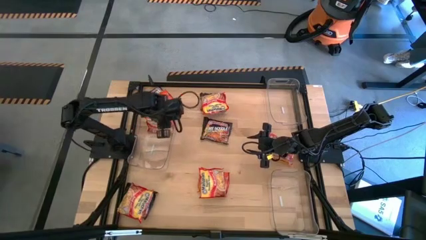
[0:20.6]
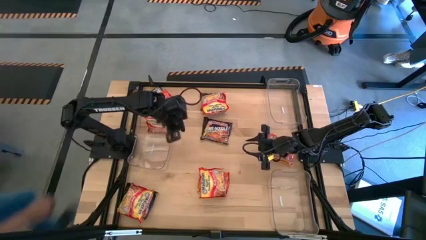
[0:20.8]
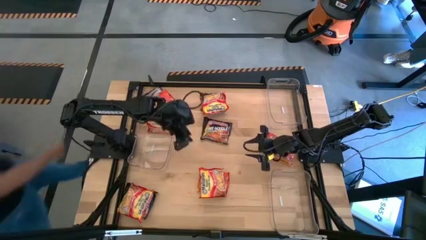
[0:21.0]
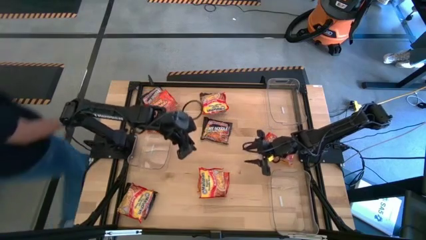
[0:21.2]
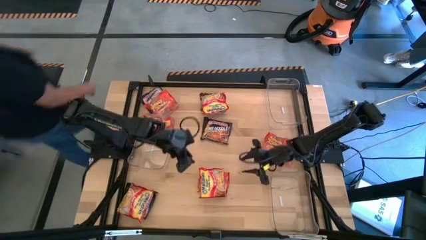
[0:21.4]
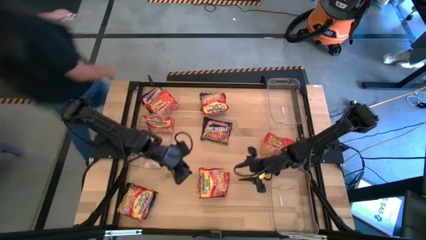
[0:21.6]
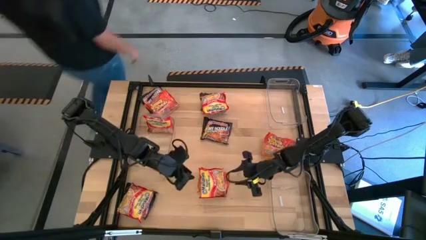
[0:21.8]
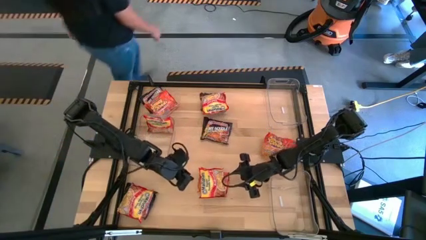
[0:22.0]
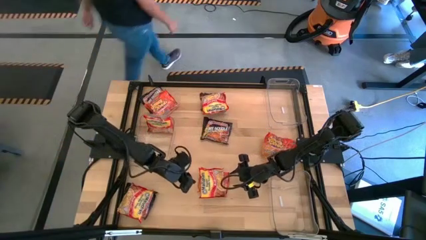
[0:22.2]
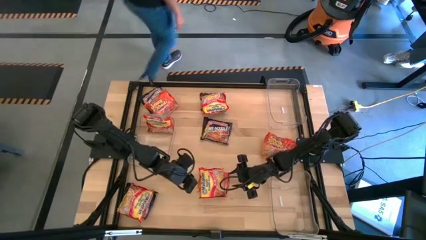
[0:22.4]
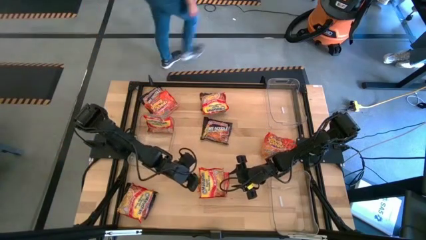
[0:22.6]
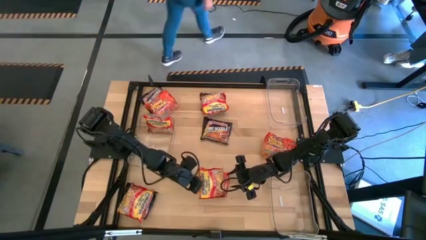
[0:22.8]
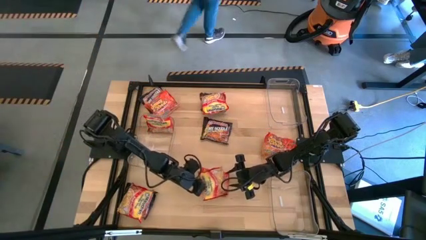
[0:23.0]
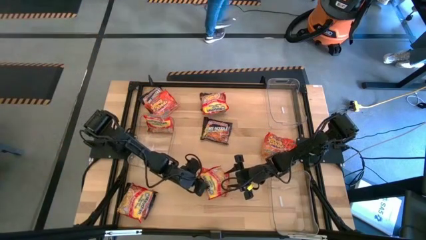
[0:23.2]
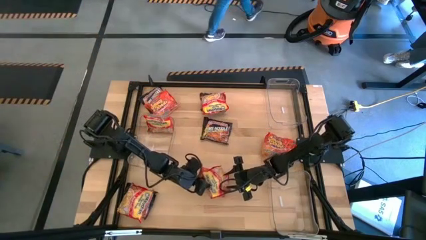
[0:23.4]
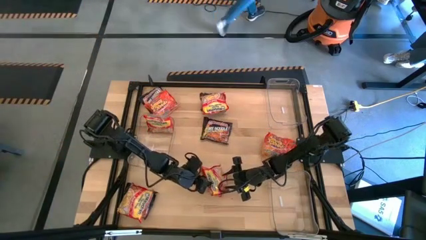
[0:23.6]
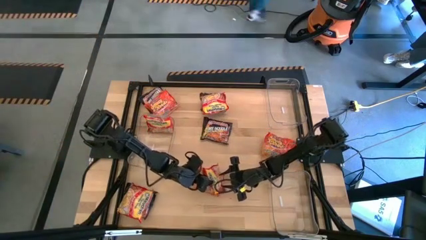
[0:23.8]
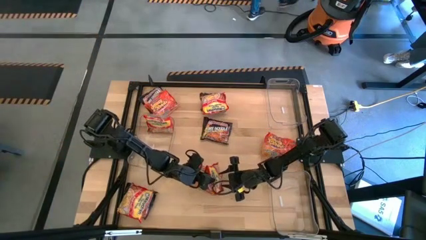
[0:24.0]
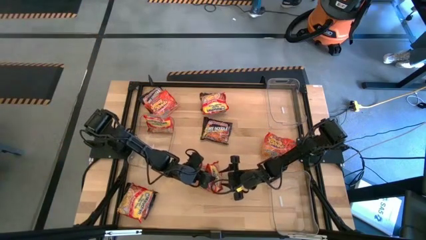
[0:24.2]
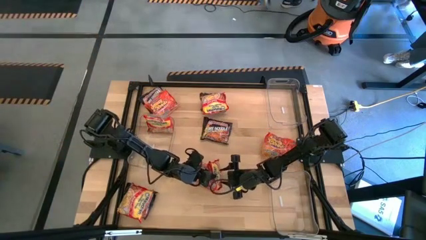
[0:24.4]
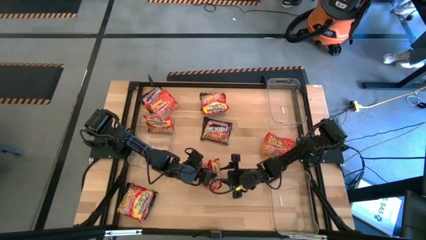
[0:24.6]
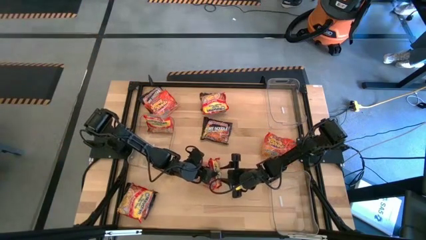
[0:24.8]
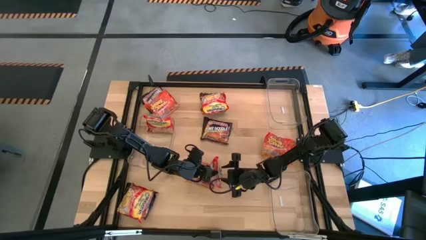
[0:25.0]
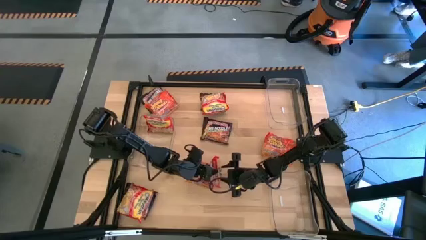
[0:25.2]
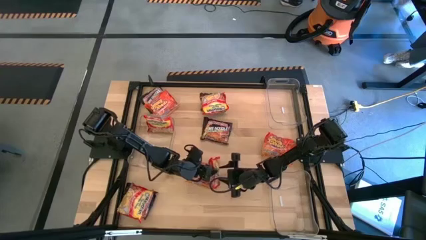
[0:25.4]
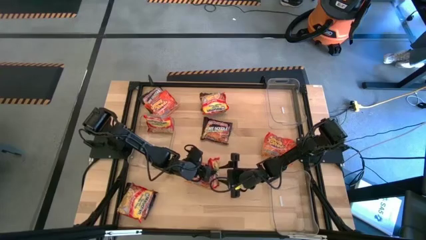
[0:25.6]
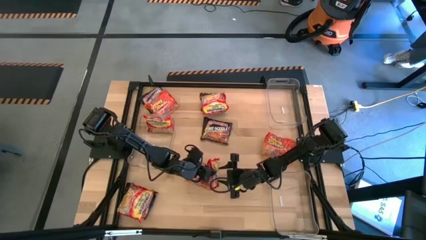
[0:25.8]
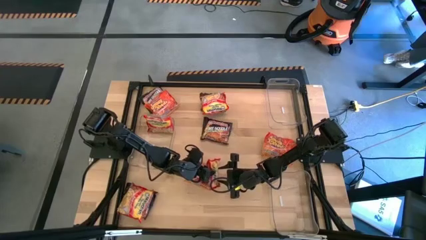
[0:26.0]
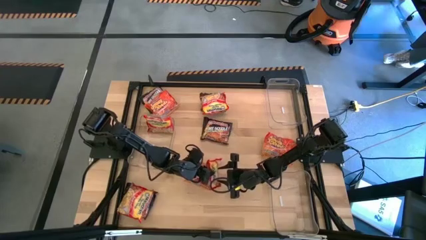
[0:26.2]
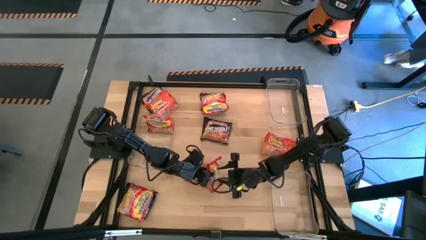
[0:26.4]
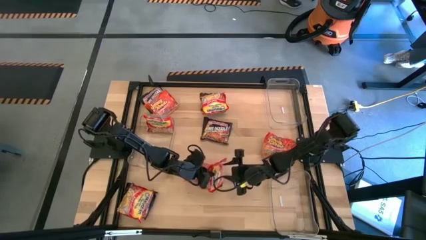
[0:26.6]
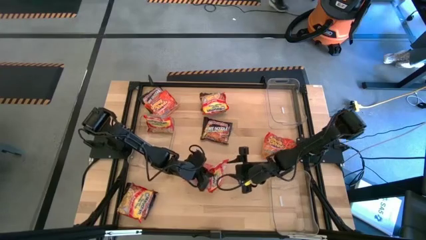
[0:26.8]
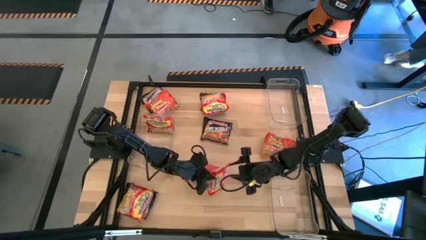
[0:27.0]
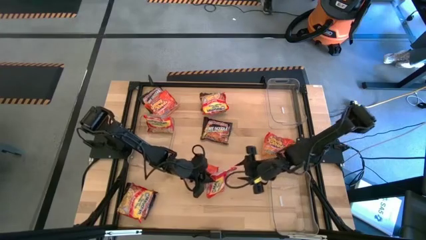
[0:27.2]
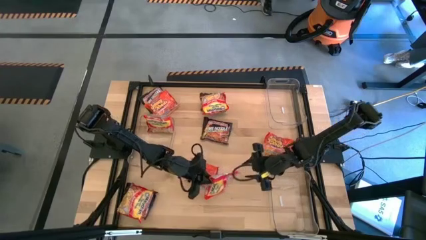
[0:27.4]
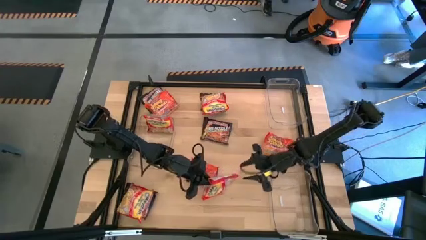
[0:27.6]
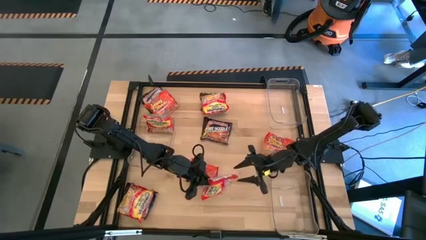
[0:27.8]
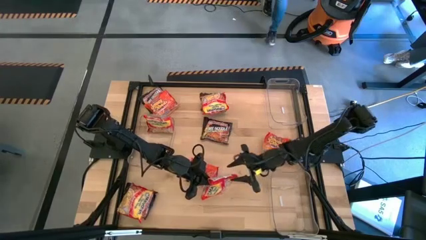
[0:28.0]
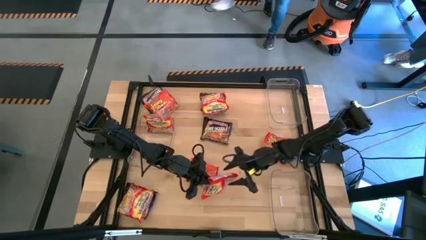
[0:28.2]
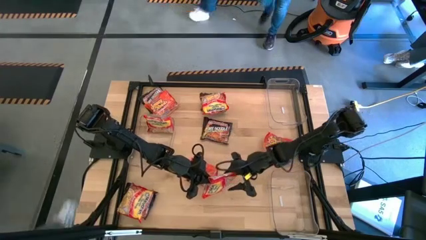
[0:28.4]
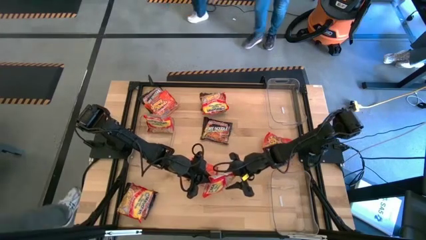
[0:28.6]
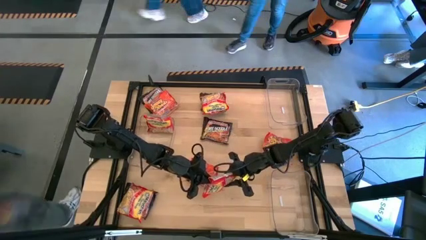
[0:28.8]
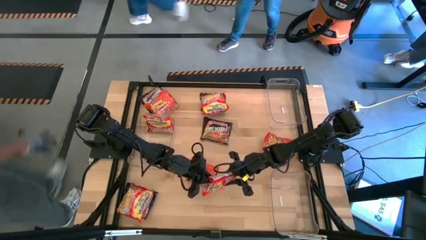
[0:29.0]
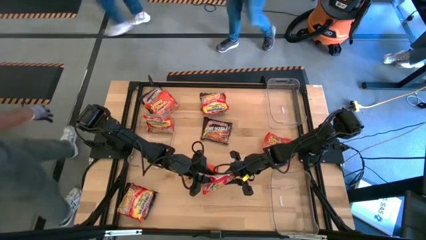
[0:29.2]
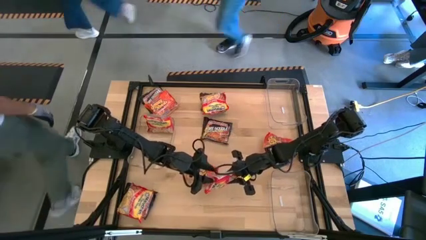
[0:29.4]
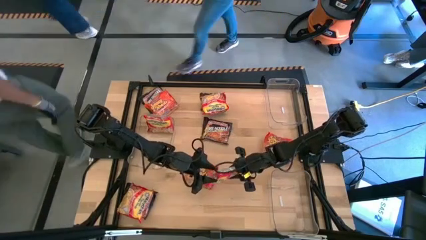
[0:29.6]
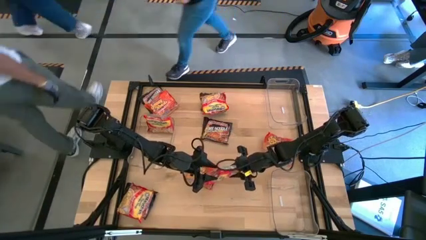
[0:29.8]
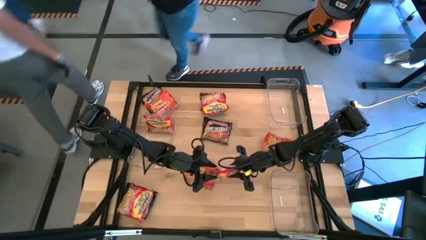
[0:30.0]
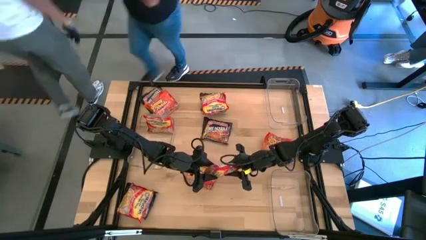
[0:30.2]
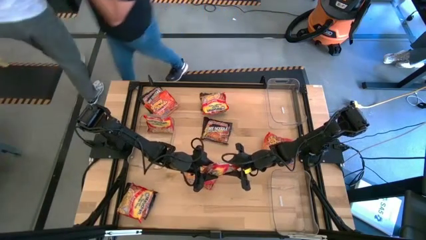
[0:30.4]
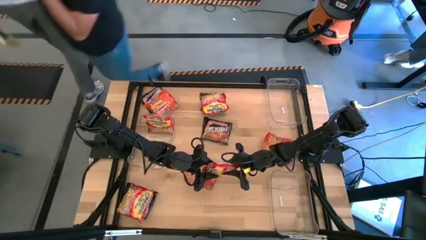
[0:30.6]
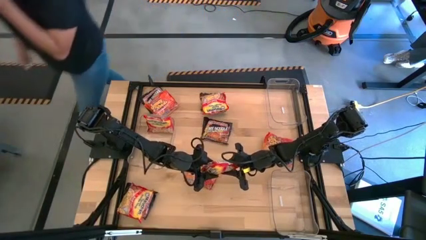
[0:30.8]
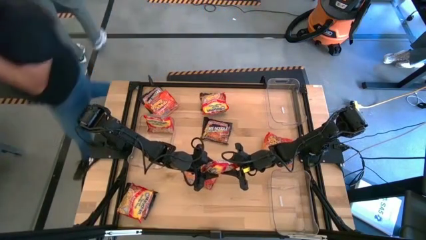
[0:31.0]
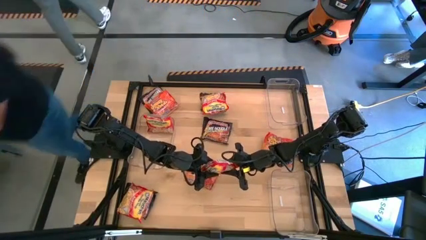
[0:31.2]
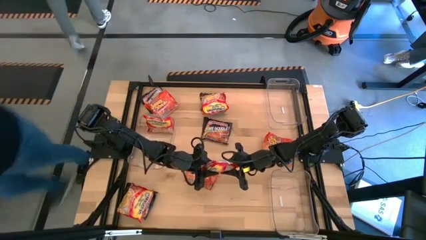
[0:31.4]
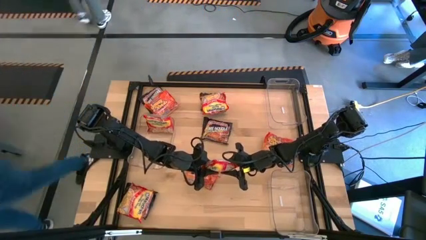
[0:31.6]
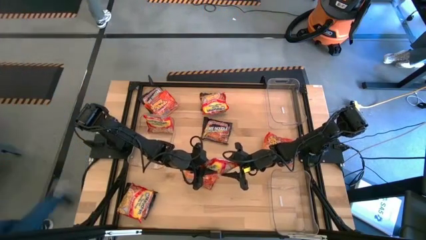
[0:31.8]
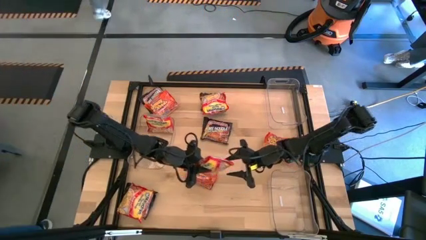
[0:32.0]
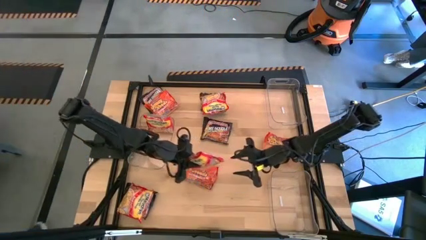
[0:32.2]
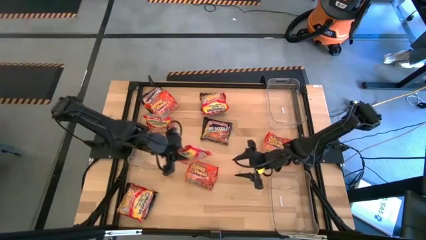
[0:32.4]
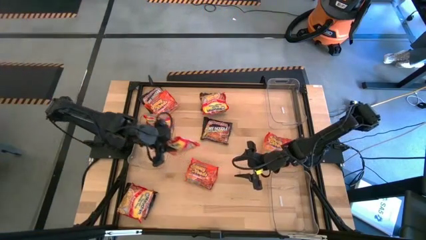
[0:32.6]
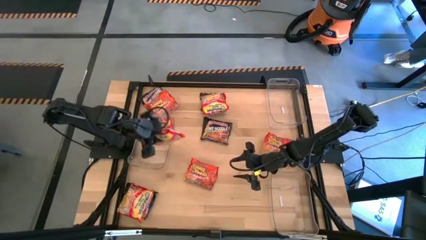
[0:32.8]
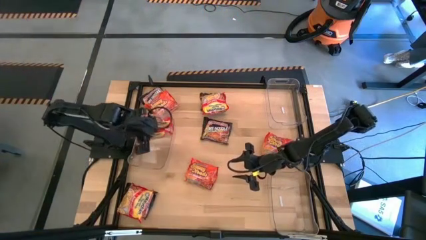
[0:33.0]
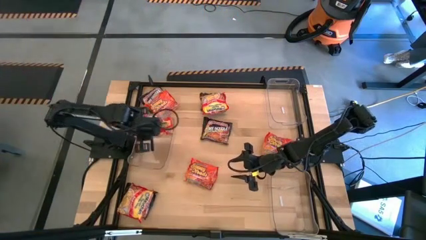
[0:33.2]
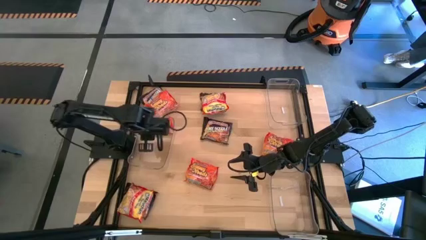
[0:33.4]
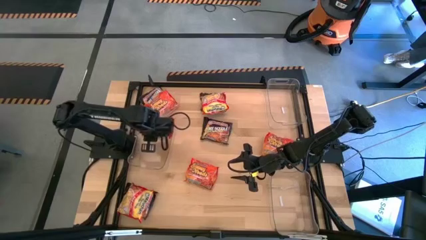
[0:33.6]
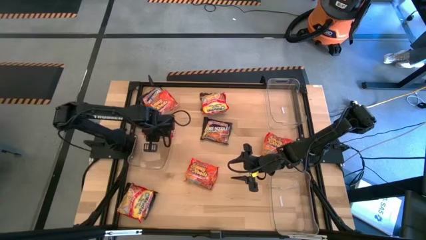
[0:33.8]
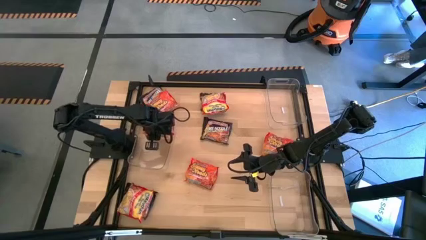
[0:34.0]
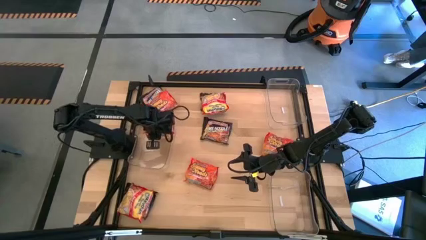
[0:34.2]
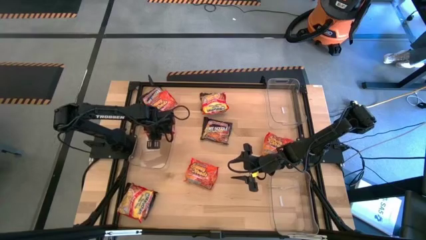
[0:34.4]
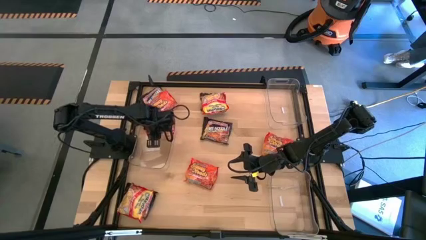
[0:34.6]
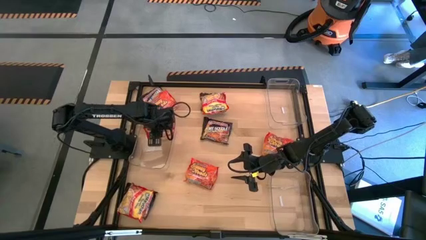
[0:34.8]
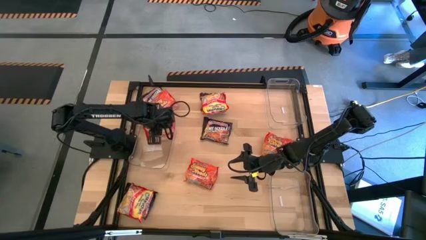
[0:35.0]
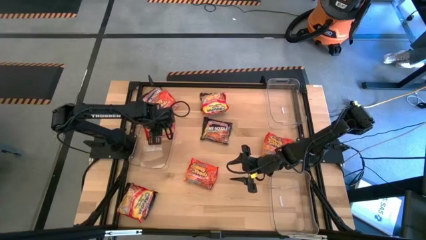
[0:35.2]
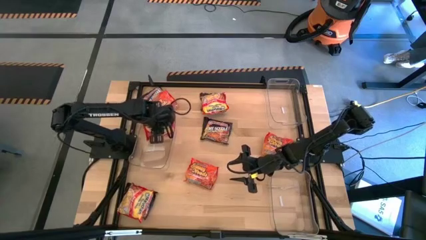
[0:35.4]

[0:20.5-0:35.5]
Task: Sort Maruchan noodles
Put the red noodle pack into the middle transparent bin
